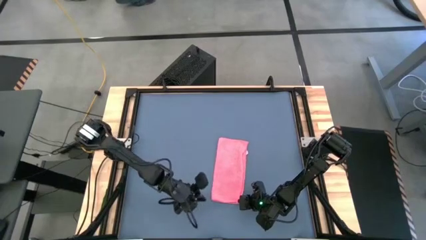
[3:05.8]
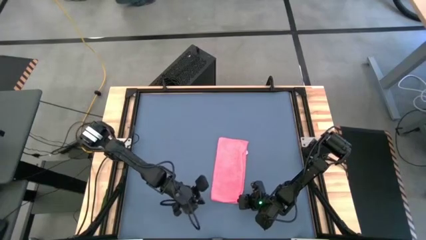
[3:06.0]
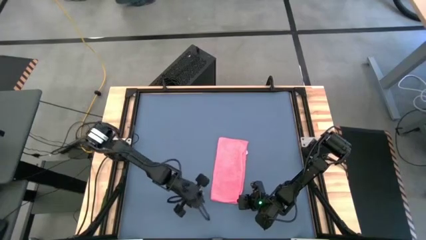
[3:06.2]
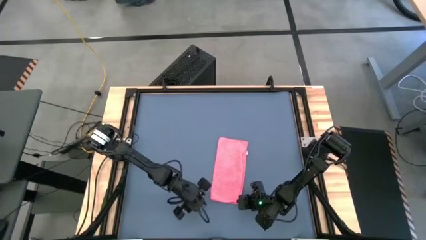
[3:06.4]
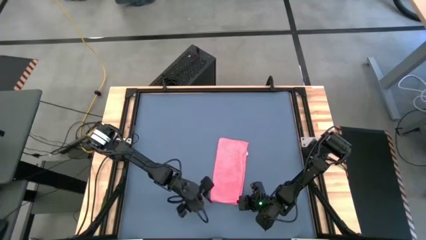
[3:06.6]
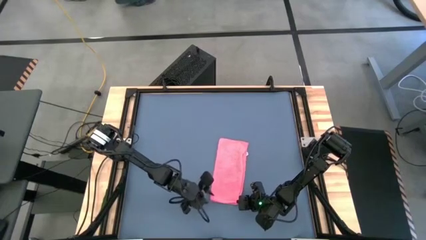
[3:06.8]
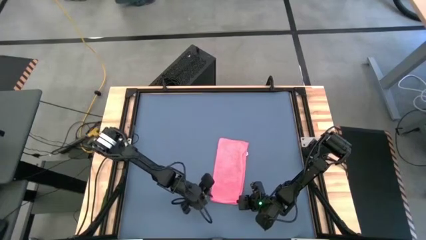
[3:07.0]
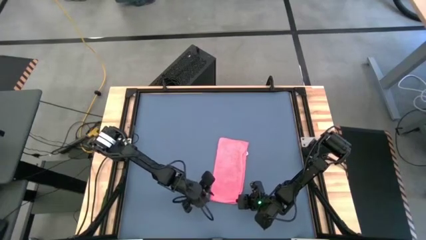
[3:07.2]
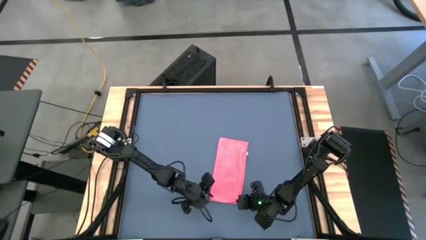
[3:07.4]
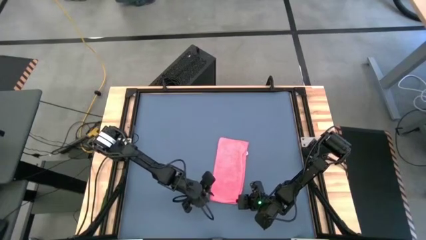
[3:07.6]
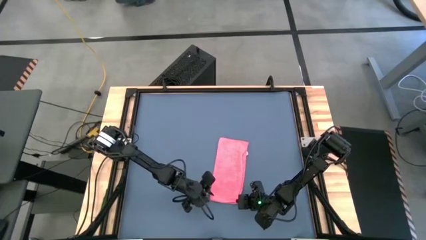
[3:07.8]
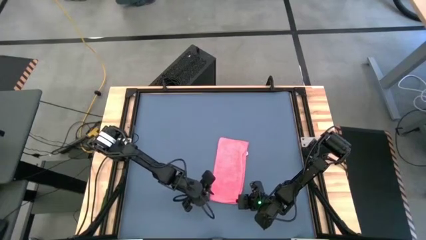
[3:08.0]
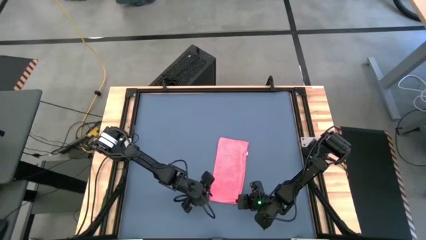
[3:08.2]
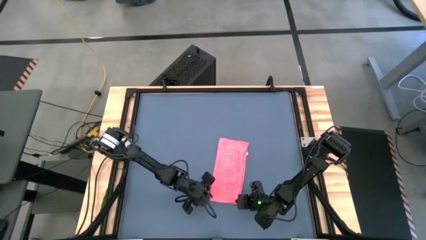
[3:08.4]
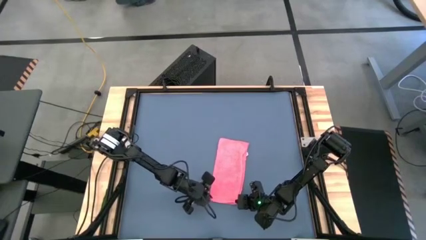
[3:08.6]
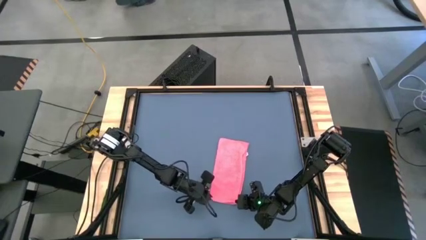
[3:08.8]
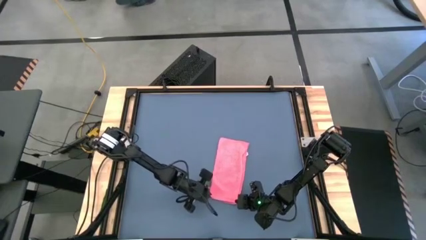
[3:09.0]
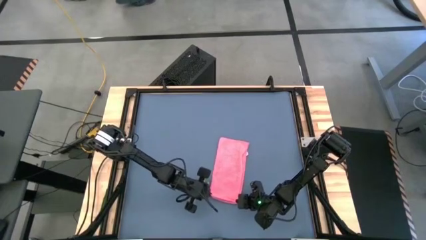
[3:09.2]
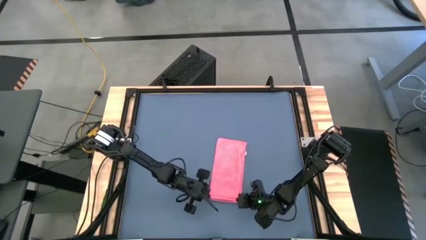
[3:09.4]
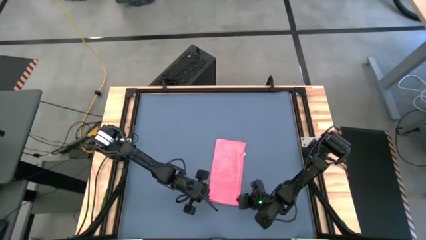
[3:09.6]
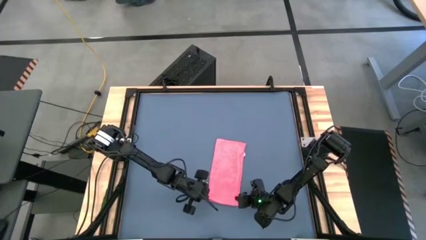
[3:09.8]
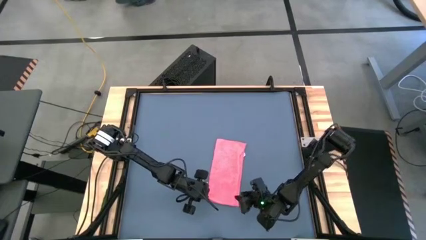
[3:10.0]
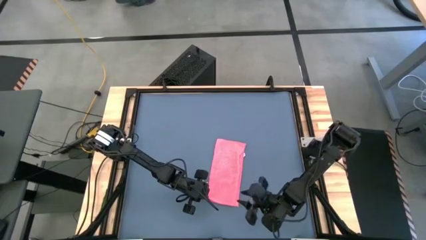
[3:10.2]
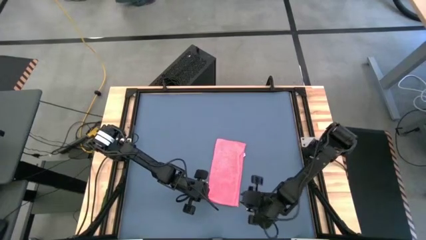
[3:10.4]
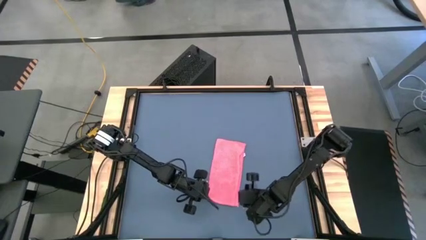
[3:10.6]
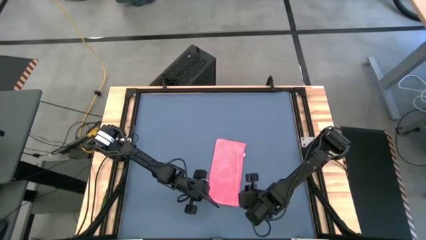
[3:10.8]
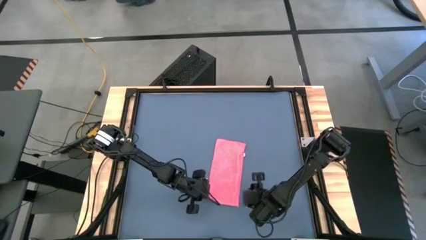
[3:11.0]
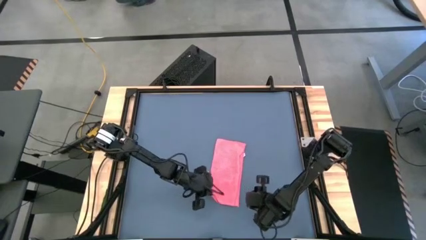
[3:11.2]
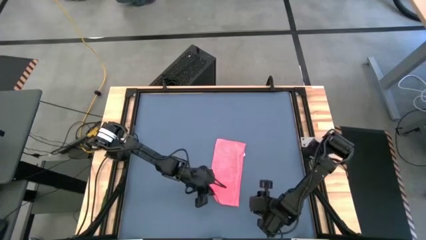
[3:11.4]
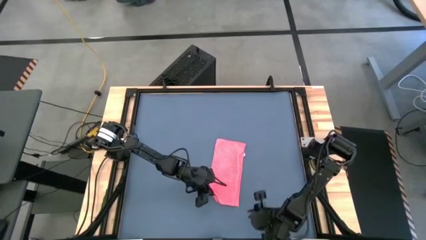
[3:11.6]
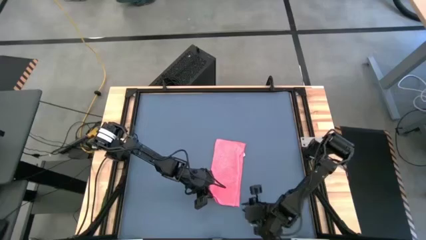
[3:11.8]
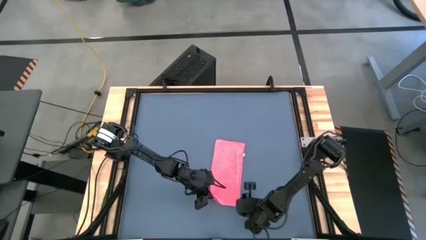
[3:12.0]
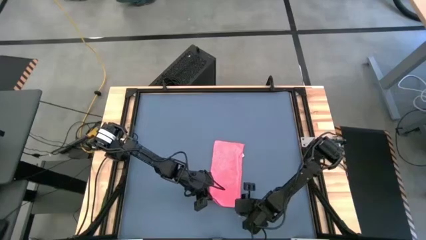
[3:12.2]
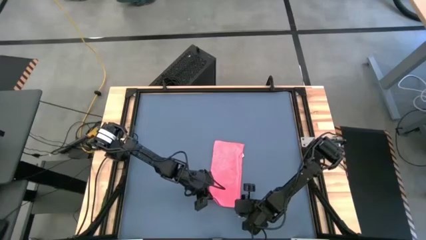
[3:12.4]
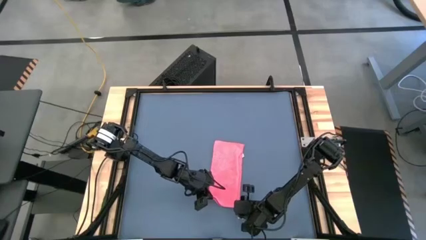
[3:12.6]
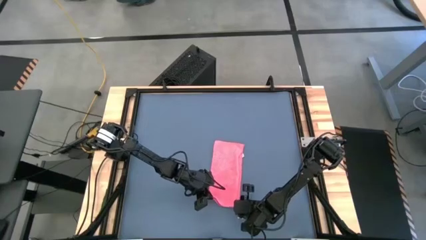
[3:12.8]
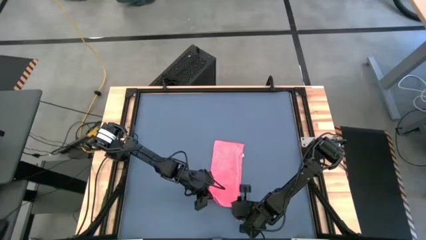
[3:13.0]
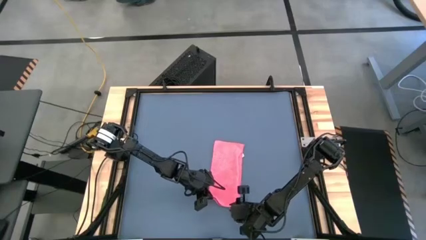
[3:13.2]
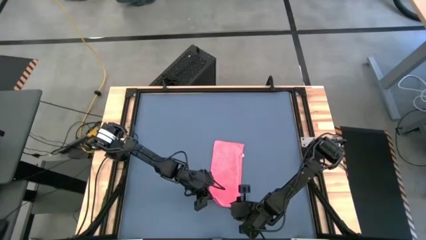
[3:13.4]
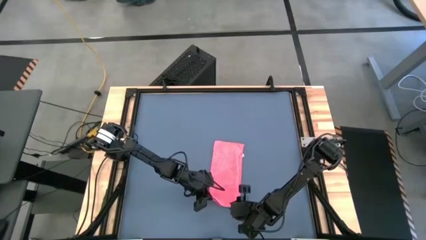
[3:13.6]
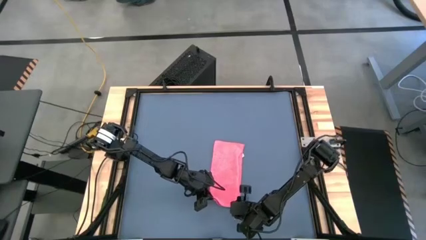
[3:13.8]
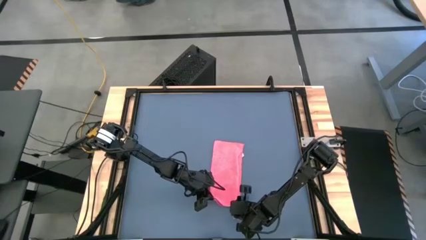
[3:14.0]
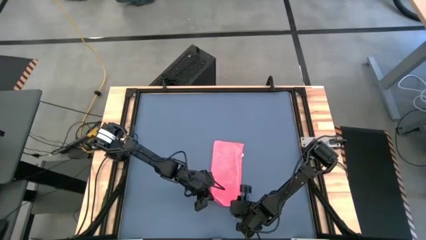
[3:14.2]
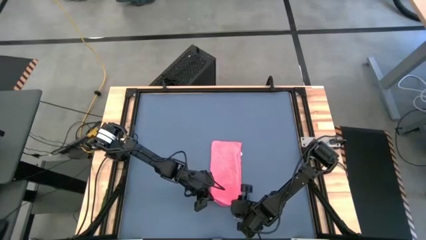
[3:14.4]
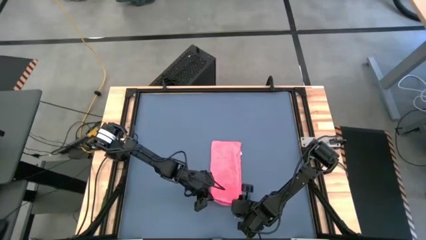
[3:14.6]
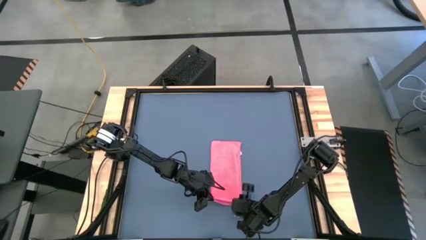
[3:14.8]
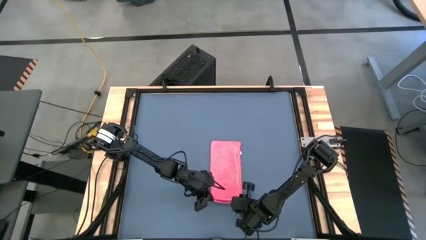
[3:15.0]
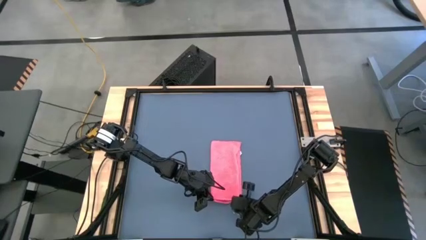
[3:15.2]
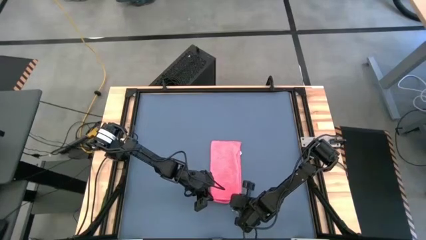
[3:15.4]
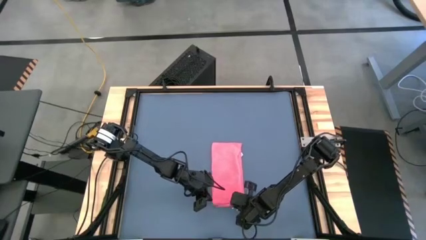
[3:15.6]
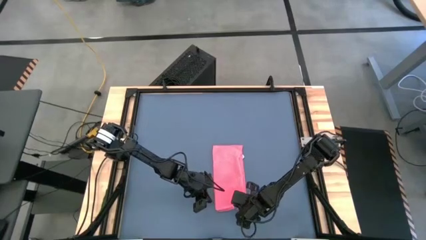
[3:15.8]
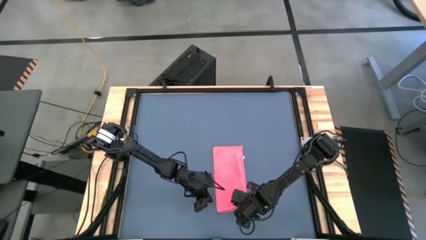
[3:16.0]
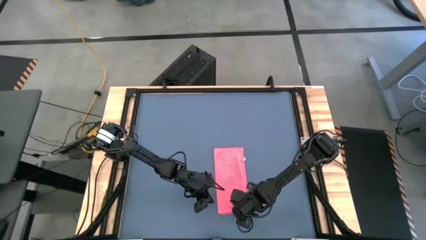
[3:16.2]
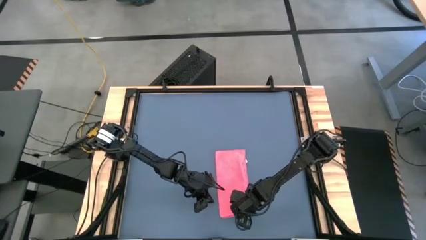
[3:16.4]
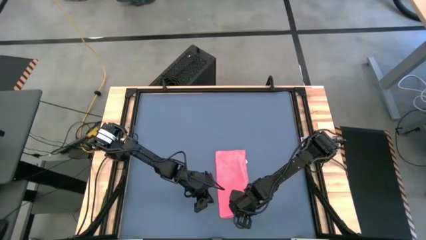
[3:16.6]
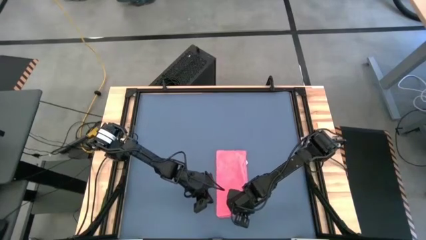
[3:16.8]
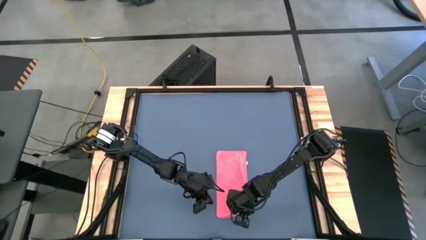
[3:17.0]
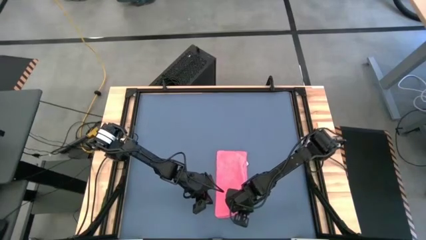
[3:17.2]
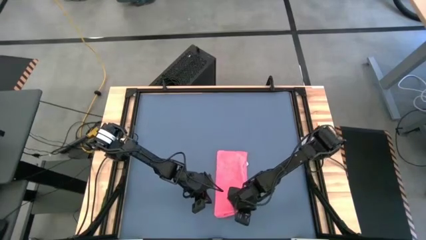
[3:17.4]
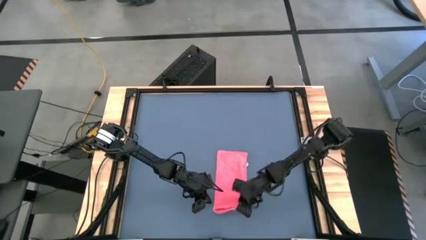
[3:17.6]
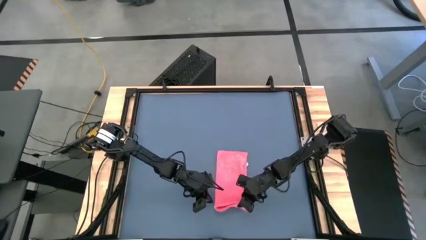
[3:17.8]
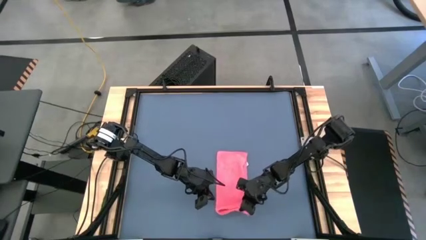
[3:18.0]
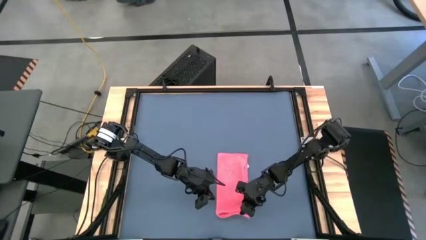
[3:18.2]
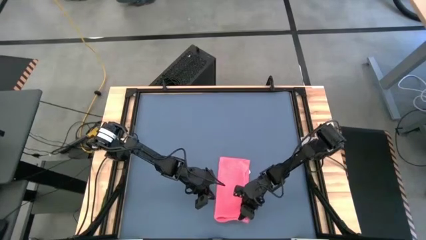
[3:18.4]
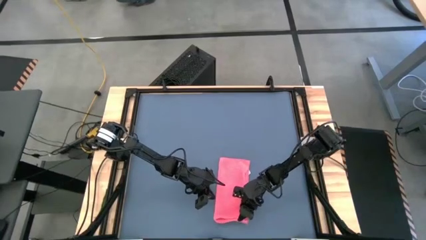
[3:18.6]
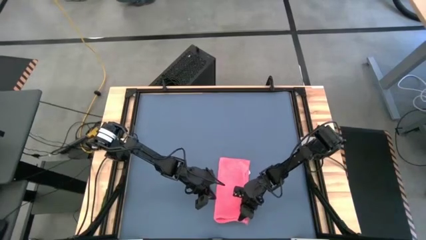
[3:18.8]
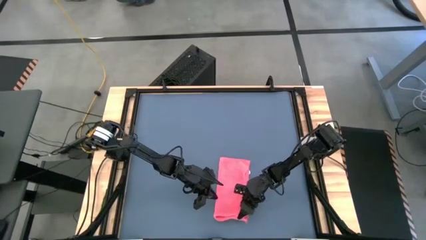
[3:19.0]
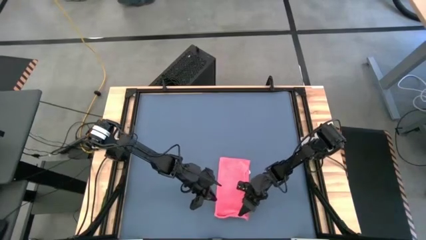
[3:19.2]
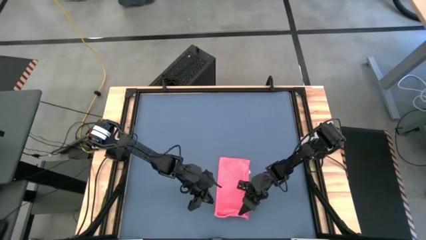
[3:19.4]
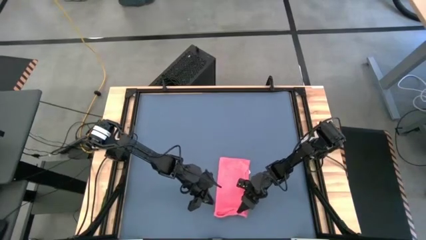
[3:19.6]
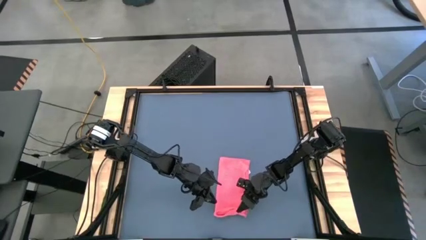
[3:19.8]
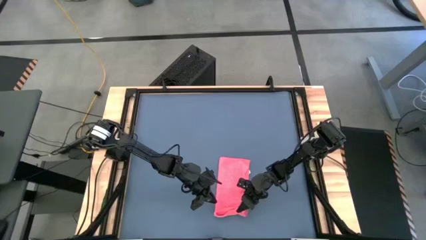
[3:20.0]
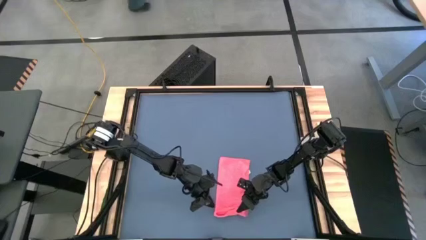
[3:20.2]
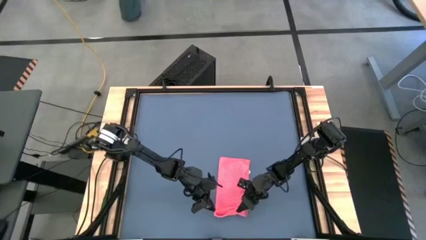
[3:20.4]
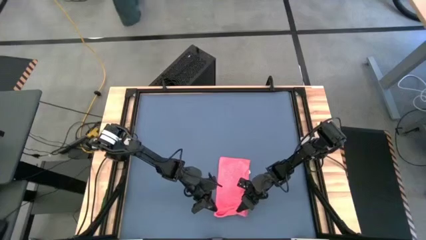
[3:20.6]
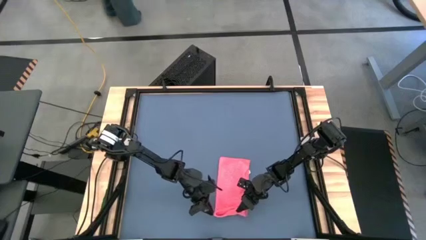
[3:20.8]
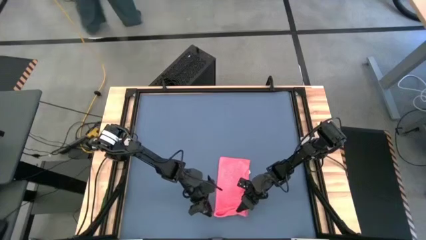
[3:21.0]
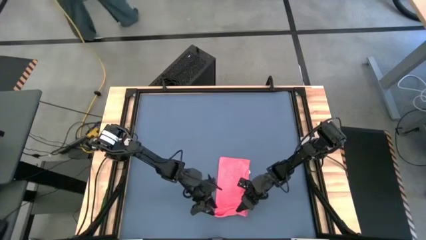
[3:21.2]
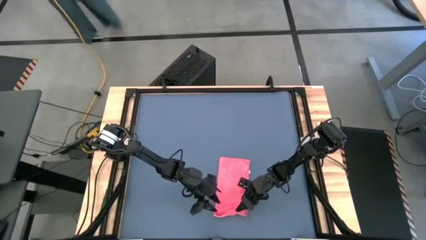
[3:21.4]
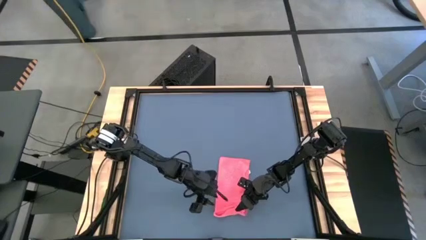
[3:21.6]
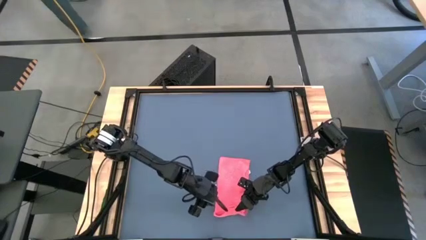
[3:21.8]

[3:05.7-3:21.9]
Task: Roll towel
Roll the pink microfiber towel
